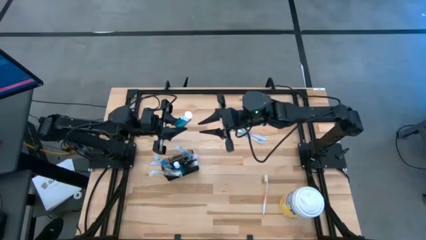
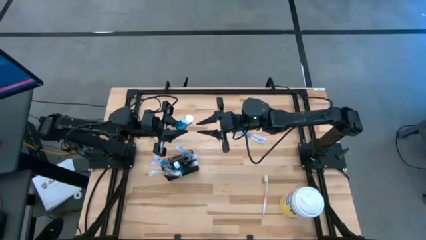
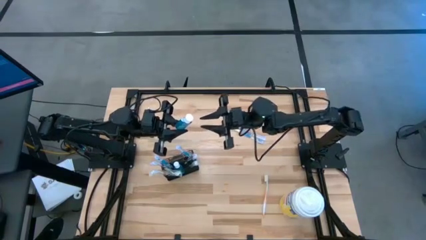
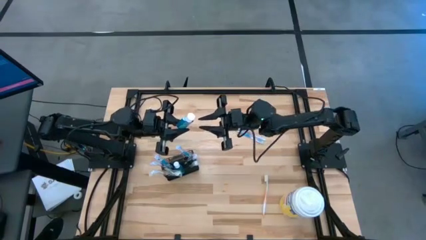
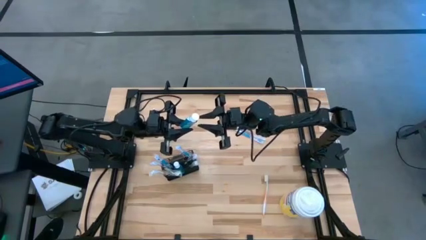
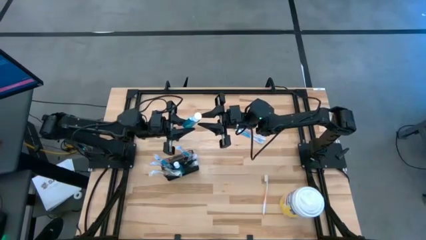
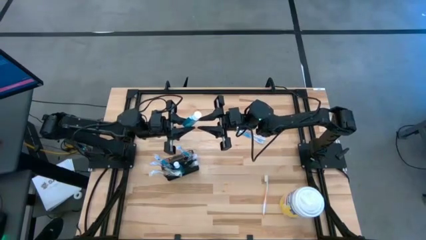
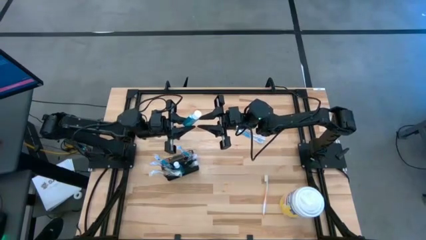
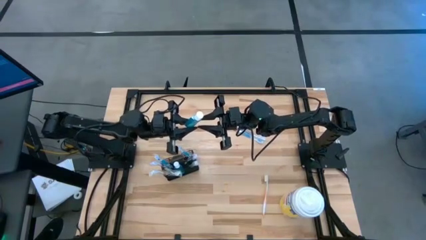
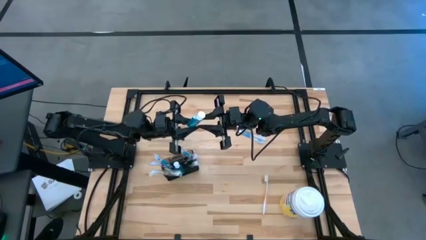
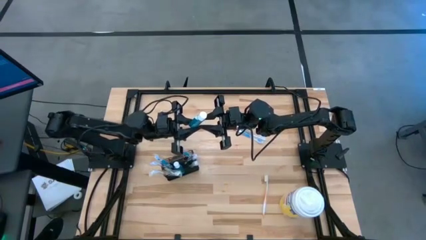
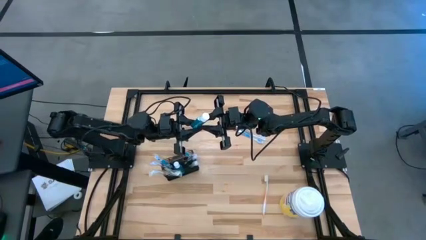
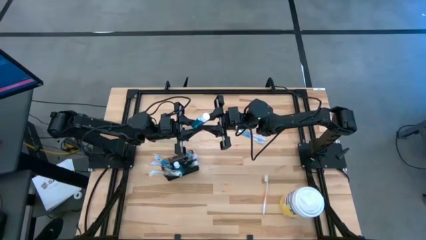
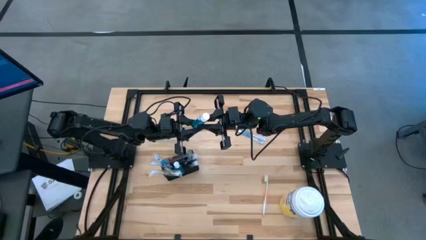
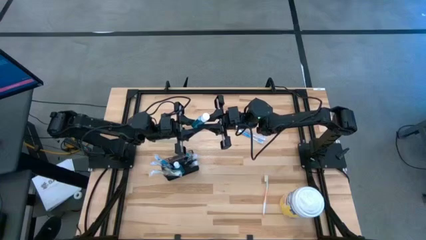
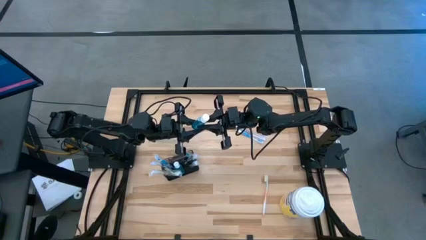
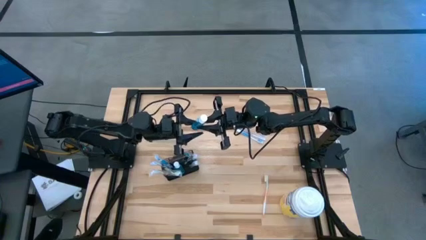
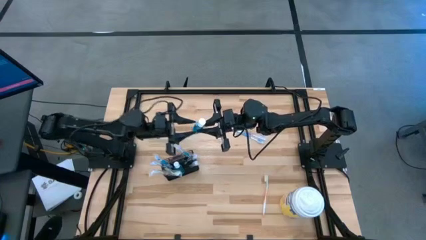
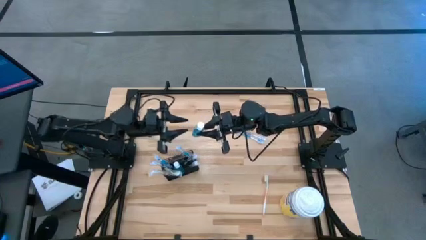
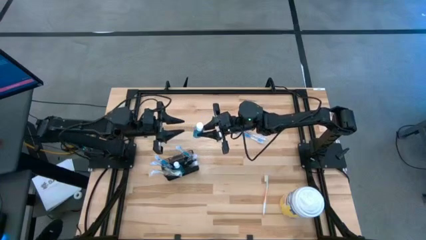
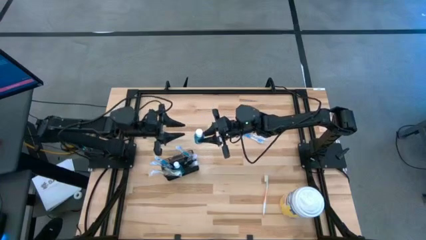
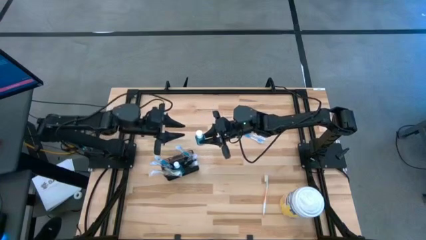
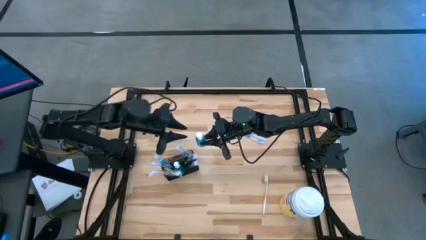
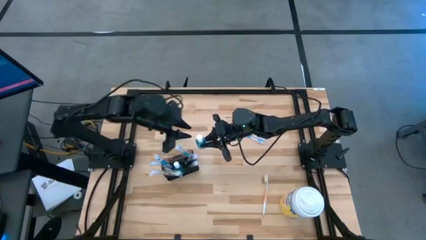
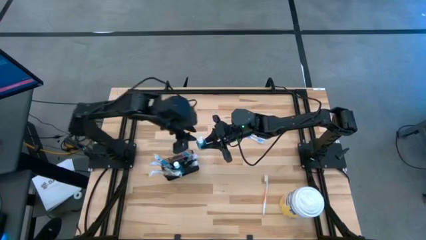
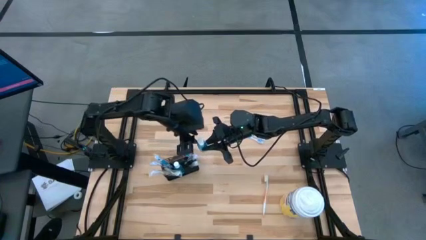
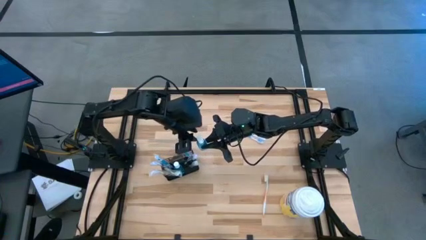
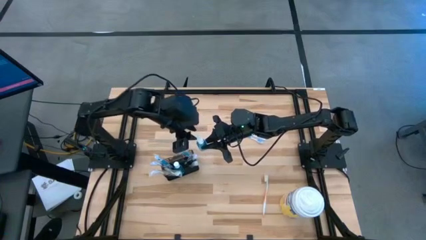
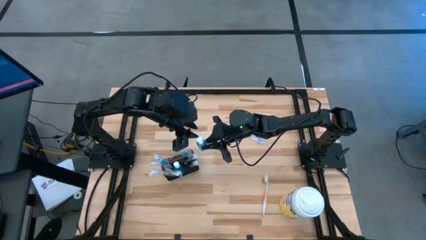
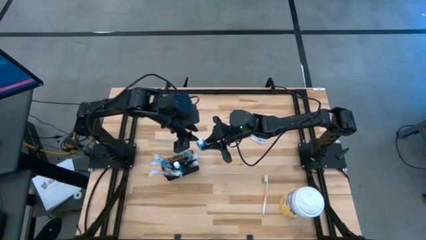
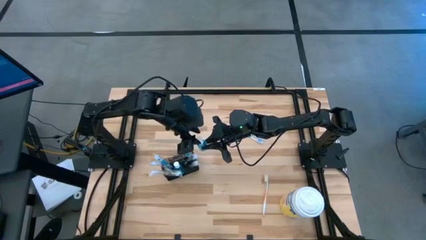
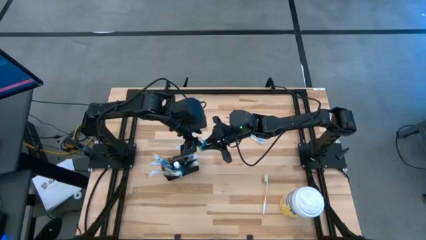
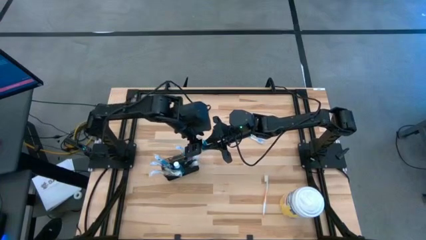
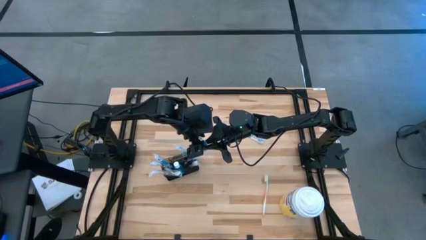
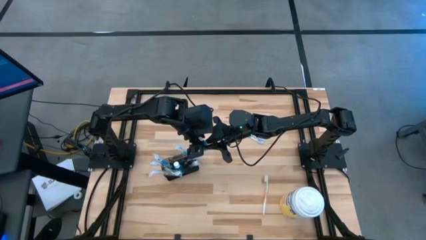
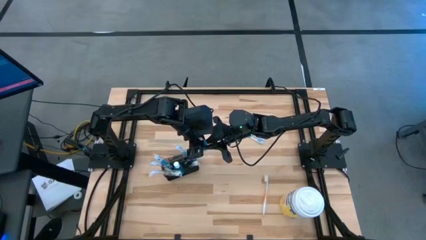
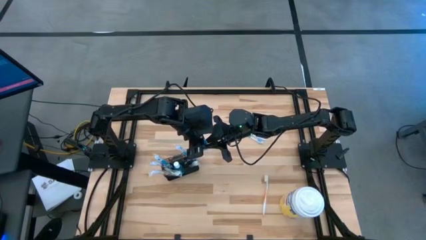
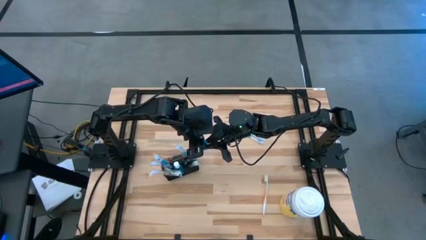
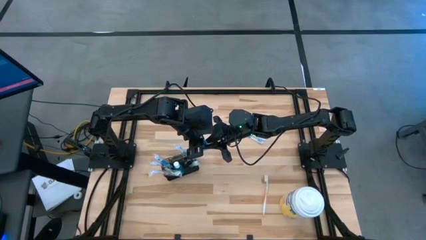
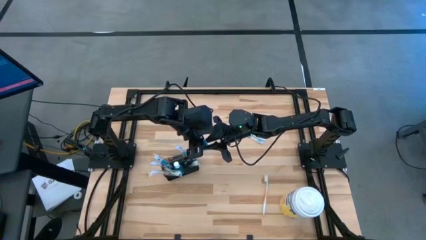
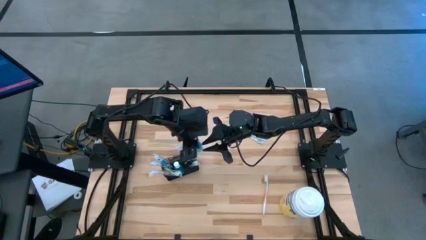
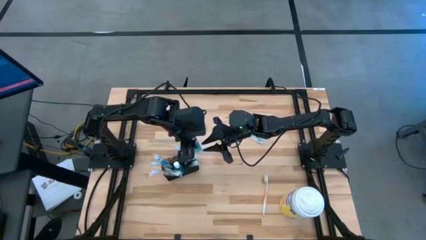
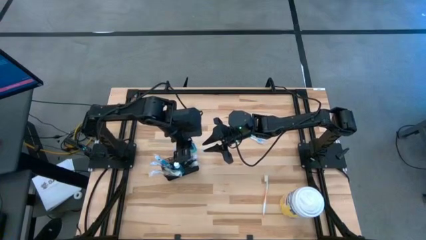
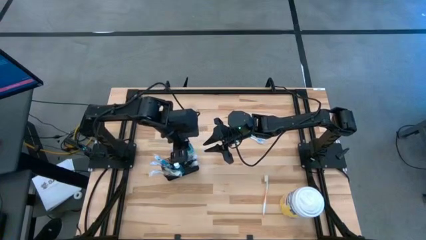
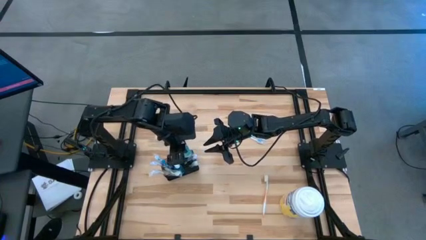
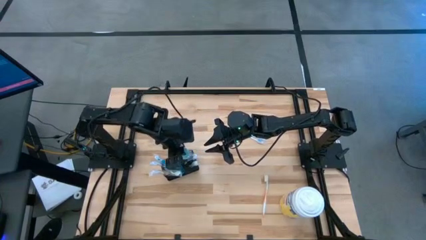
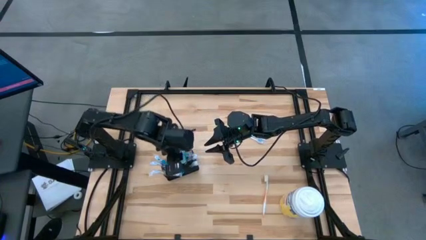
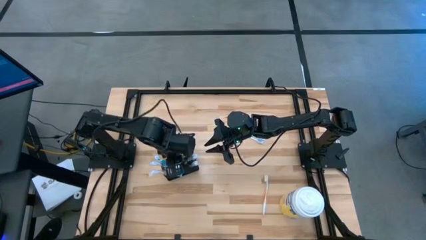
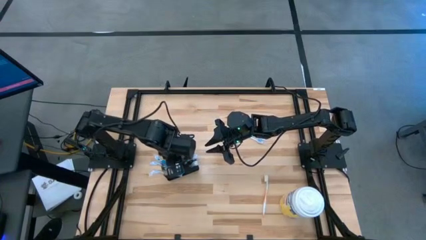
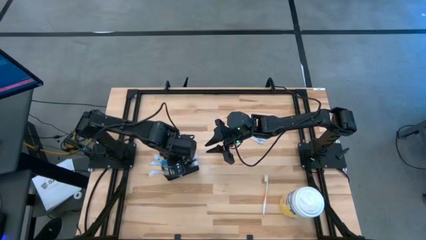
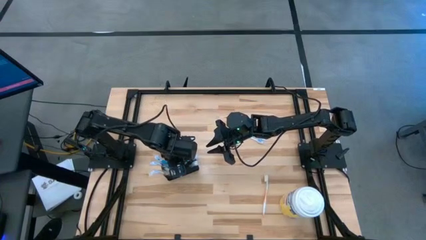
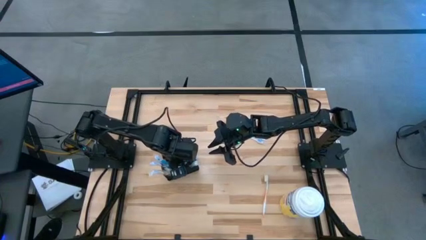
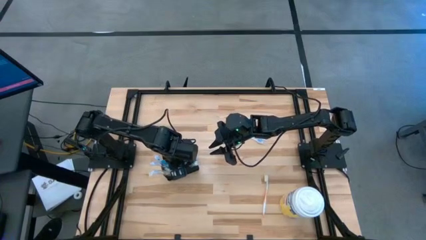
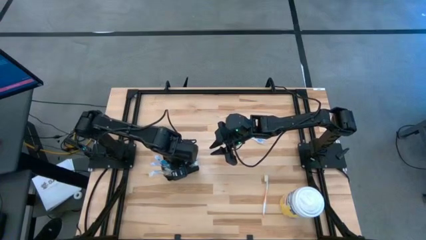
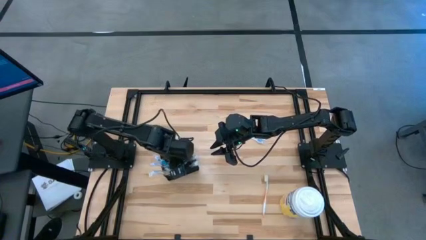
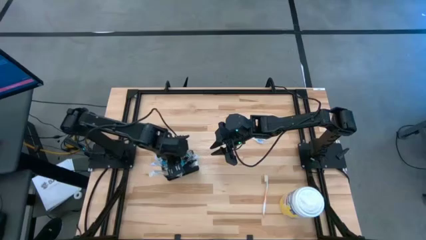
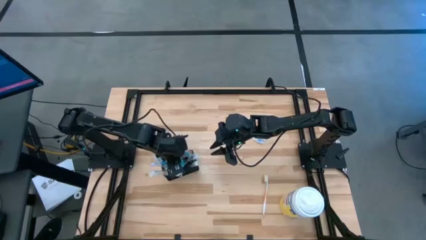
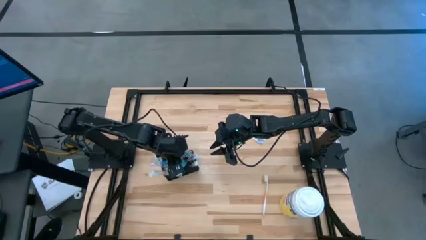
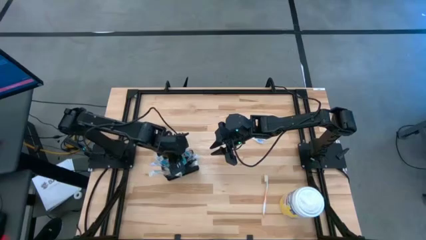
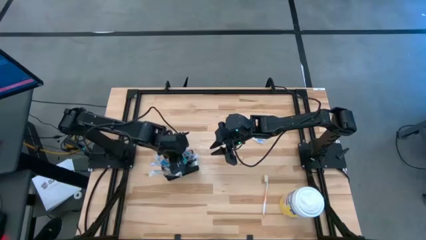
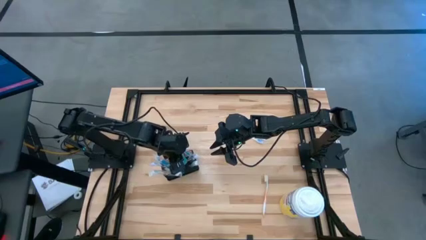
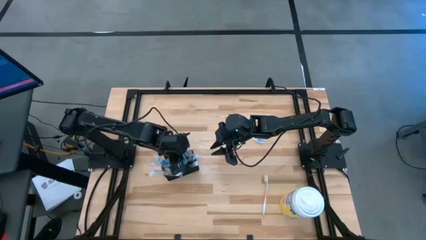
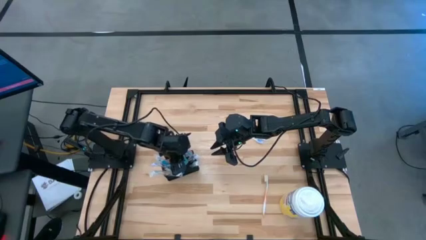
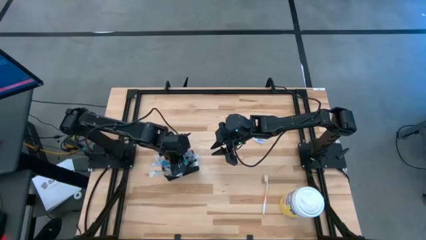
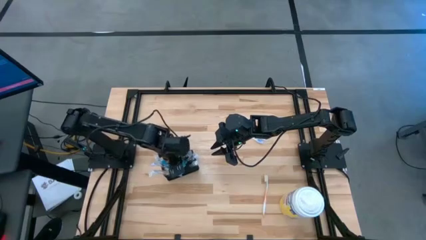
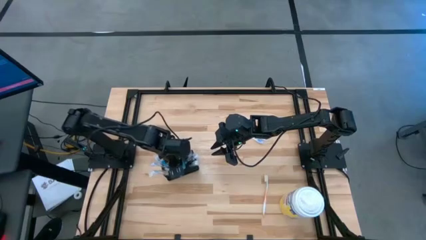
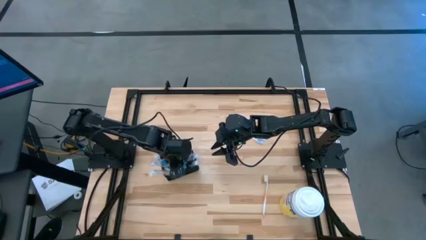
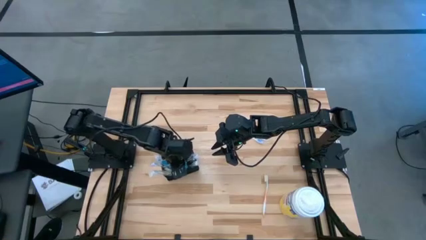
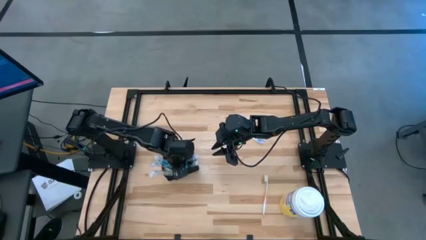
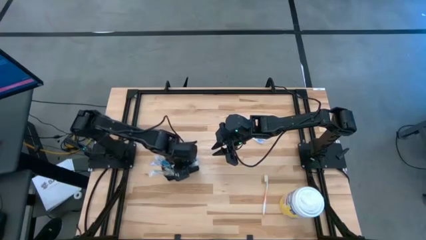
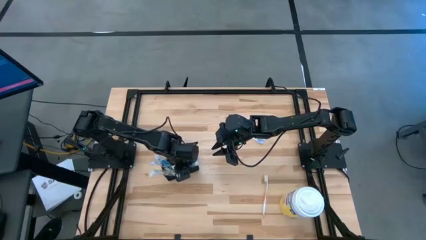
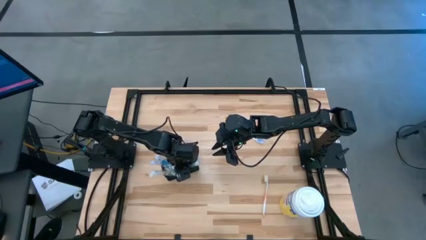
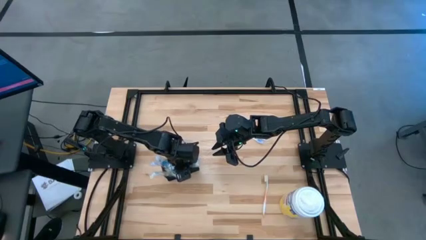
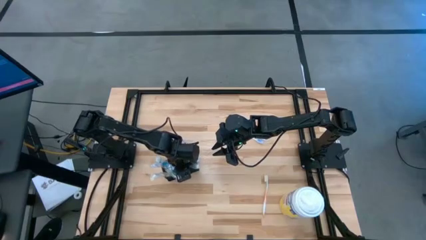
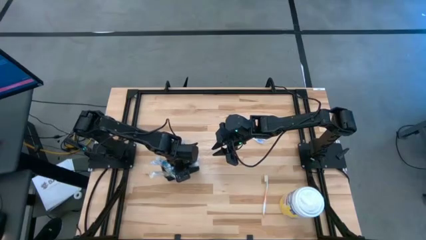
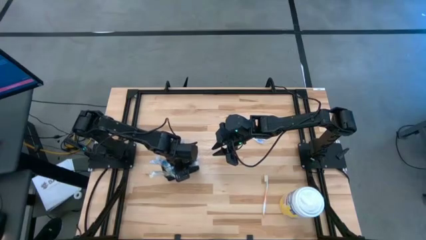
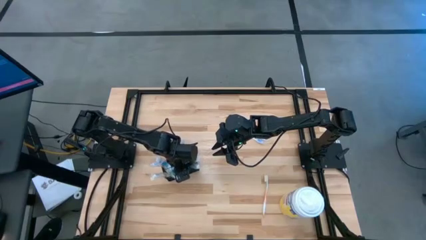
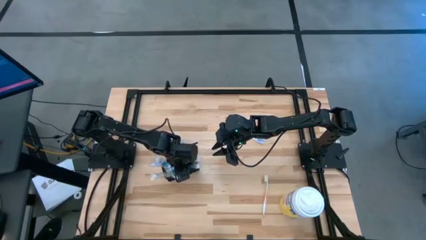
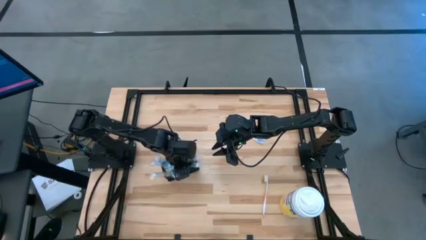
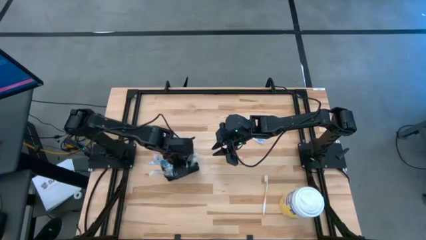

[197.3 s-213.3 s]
Task: Pick & Place toothbrushing station
Put the mouthwash into the middle section of the mesh organizer

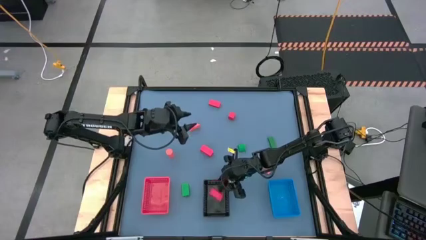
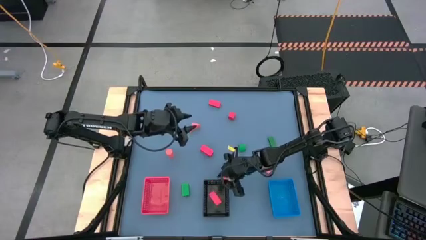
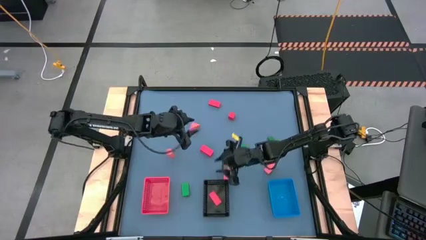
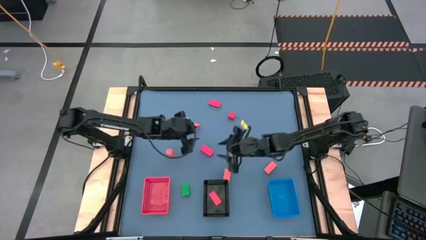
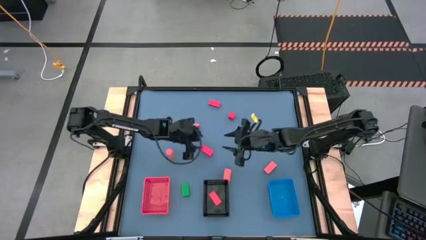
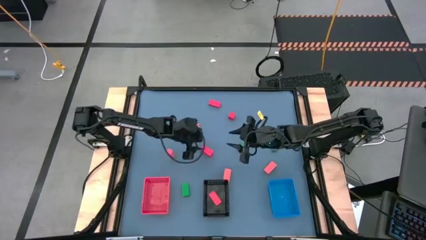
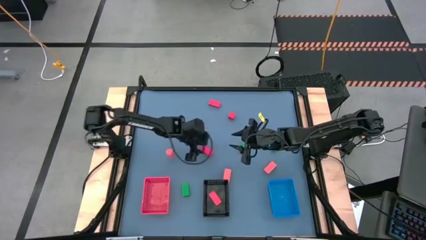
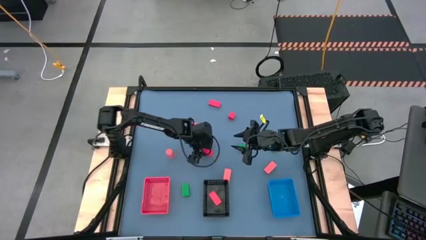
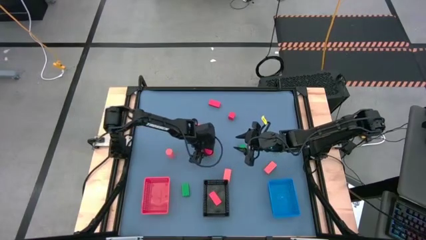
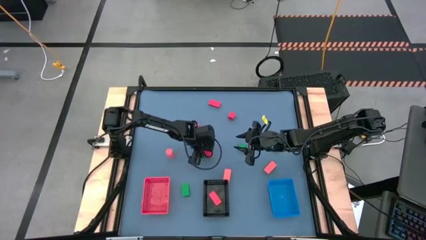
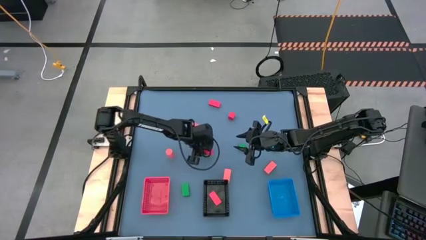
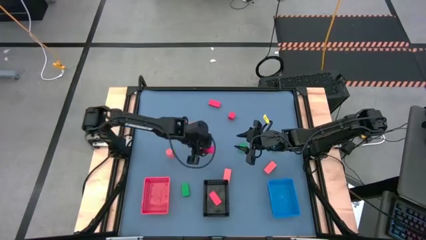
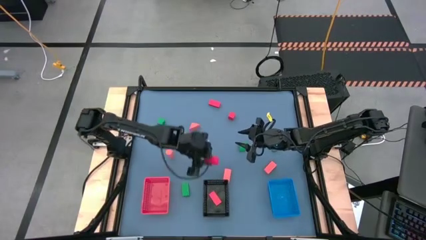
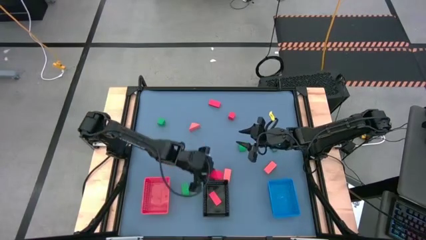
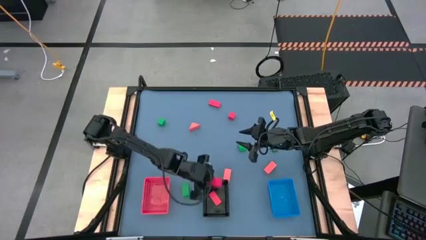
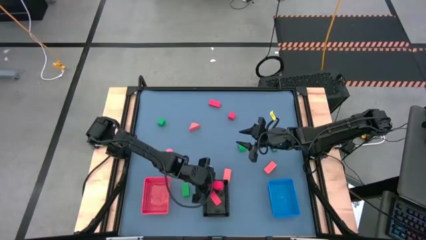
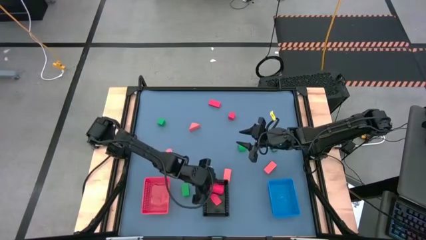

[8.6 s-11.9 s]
Task: Sort & place blocks by color
Put the red block into the black bin
